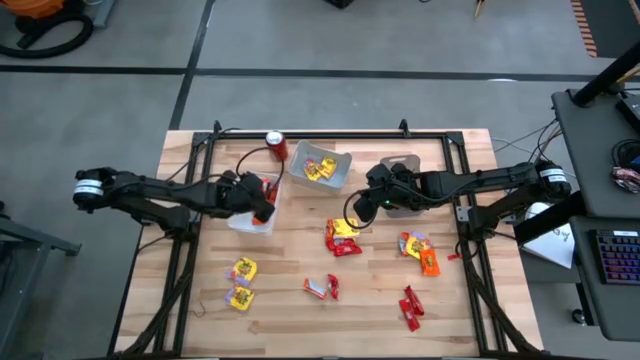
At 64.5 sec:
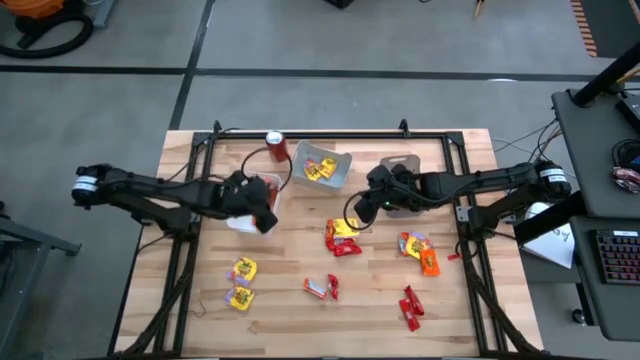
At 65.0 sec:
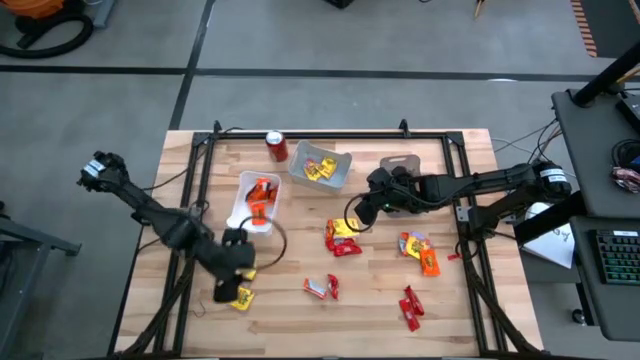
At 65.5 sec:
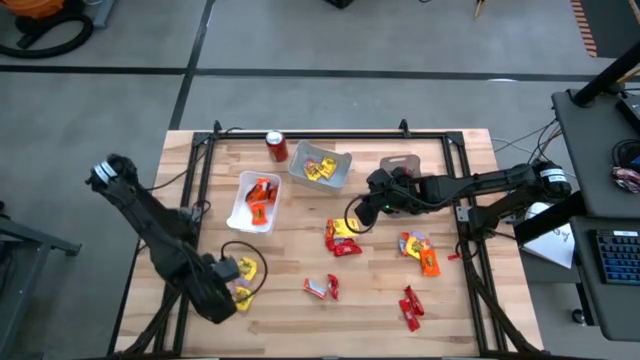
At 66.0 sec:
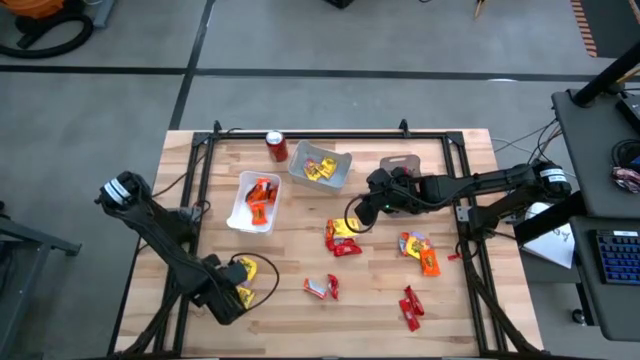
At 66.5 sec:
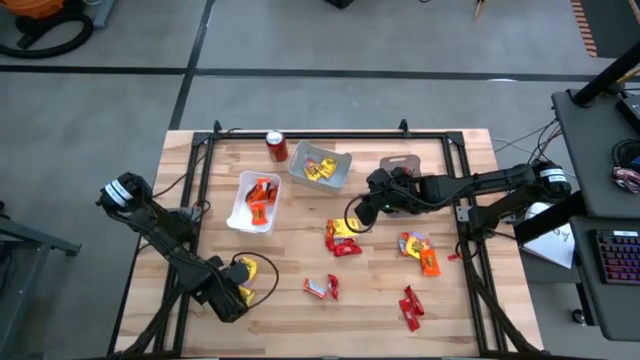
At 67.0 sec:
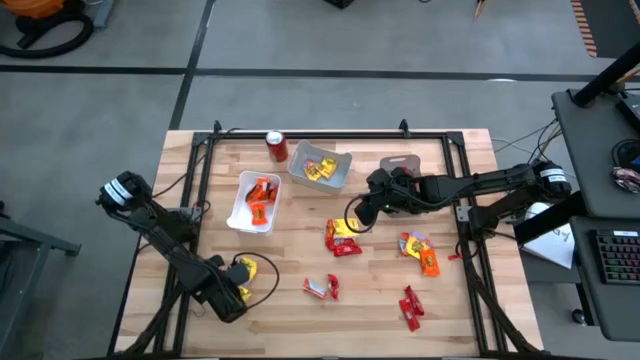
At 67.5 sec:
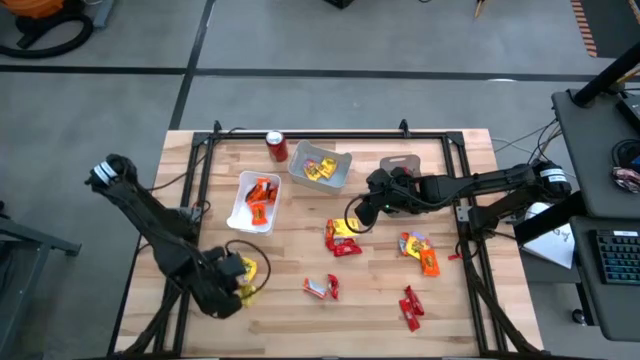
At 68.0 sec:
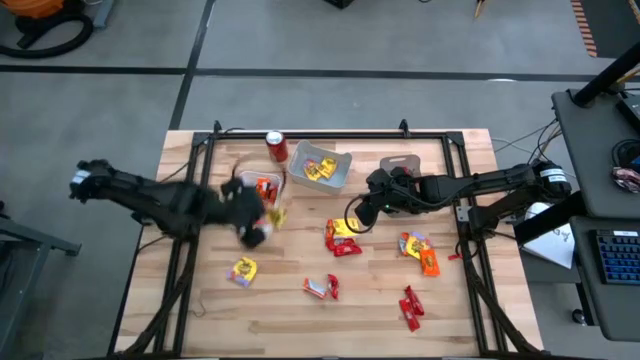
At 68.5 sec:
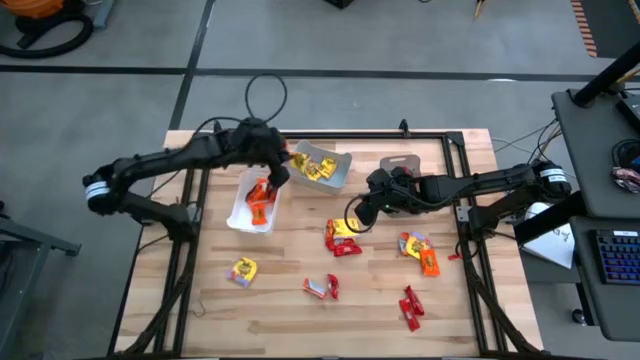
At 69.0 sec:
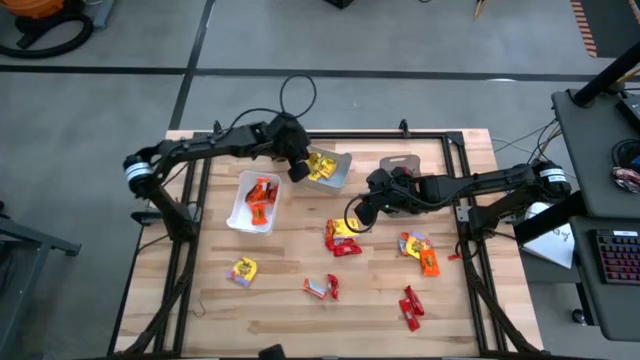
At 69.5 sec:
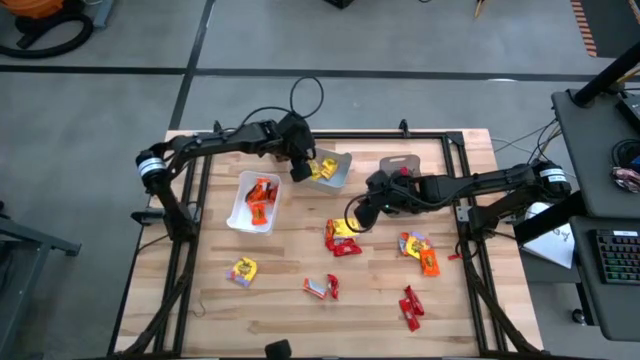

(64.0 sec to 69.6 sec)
Task: Sort candy
Put the yellow candy into the gray bin

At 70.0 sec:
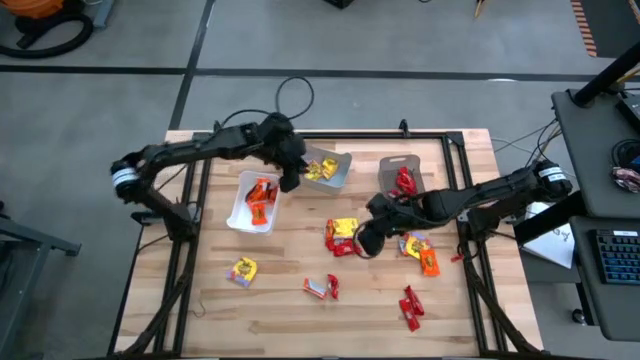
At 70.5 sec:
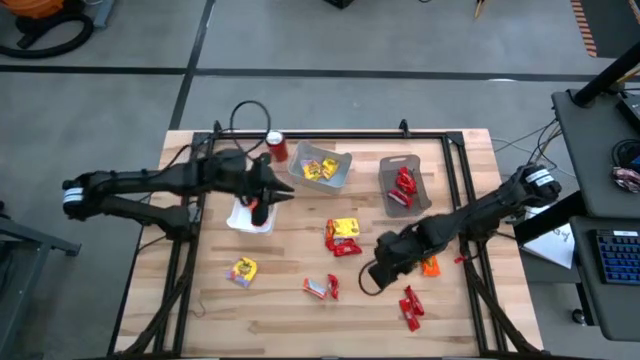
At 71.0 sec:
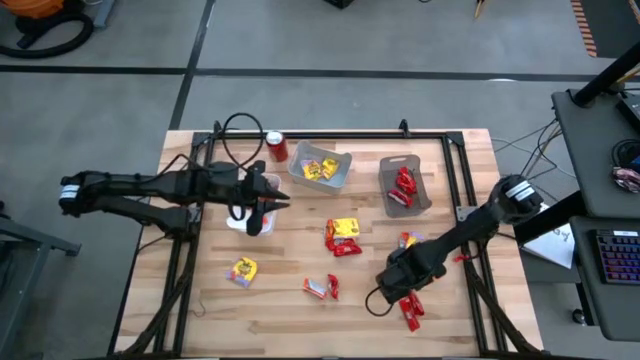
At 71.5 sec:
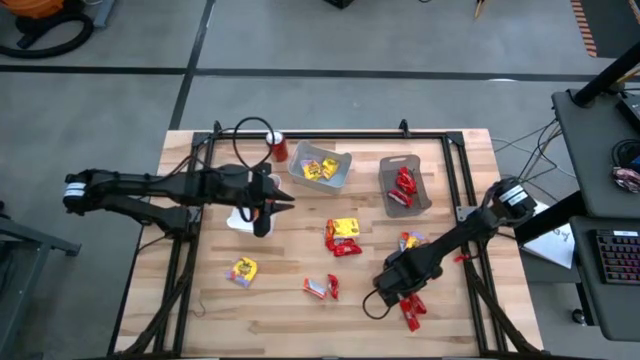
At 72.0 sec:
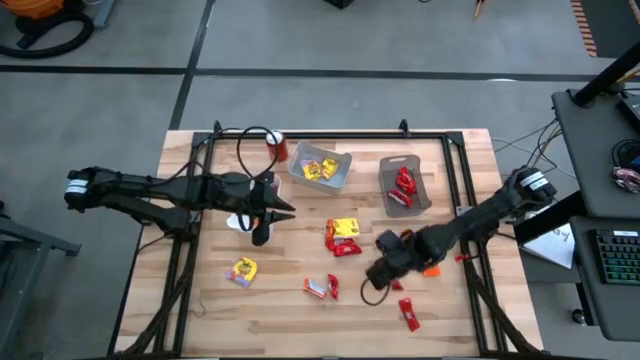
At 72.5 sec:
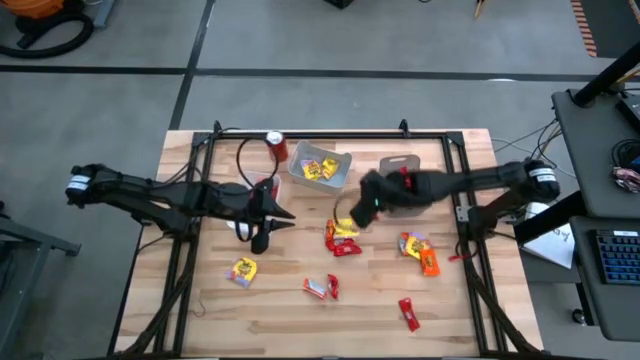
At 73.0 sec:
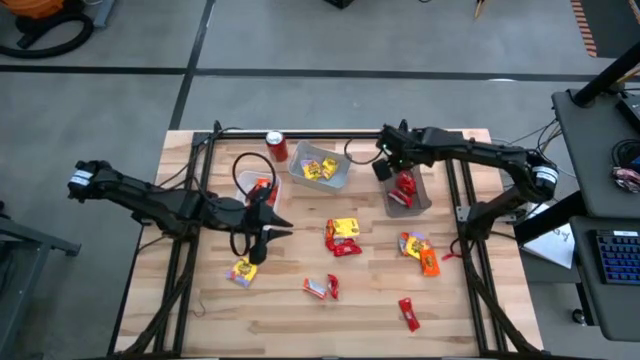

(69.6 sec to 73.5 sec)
Put the red chocolate into the black bin

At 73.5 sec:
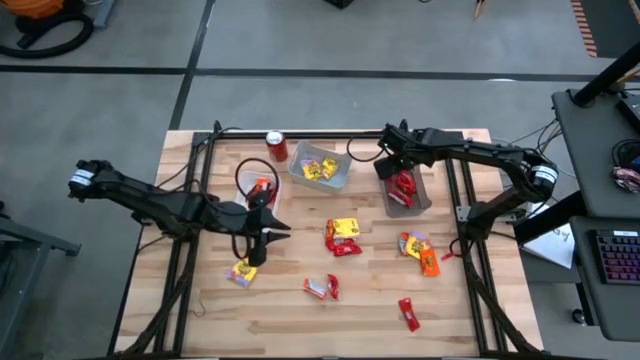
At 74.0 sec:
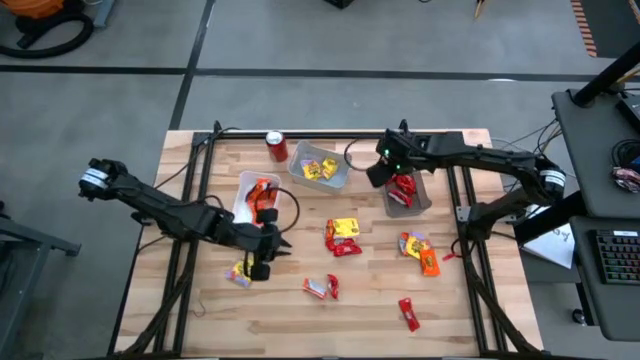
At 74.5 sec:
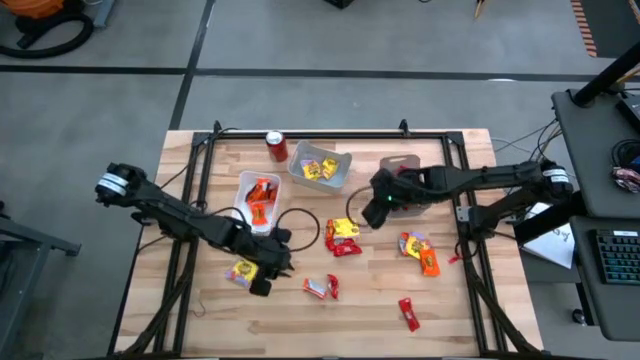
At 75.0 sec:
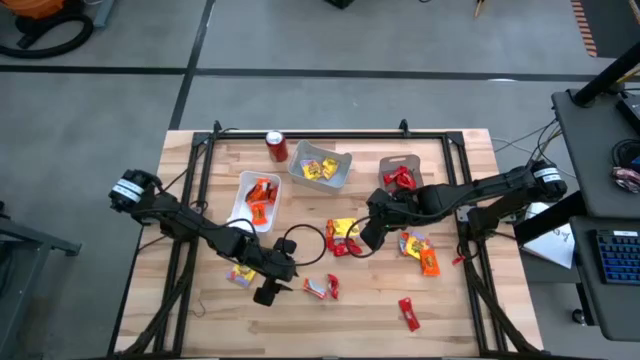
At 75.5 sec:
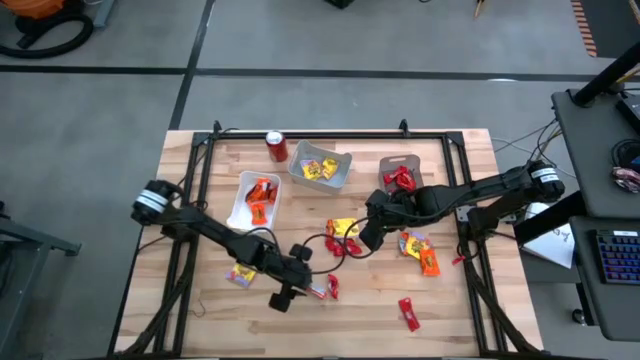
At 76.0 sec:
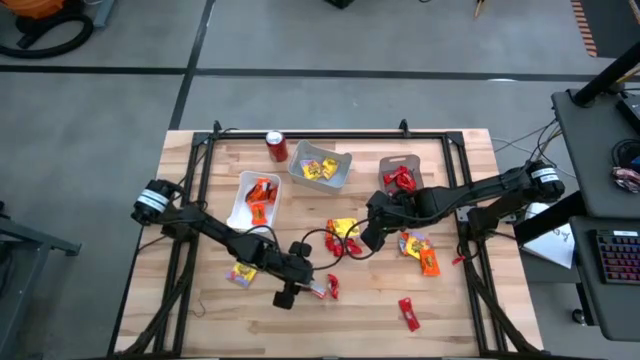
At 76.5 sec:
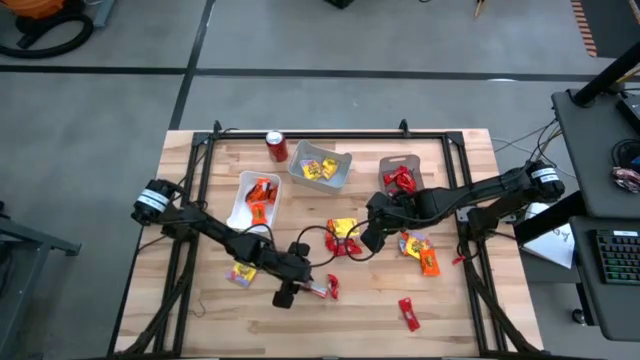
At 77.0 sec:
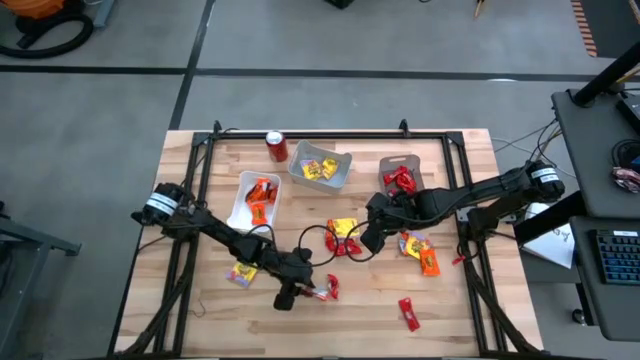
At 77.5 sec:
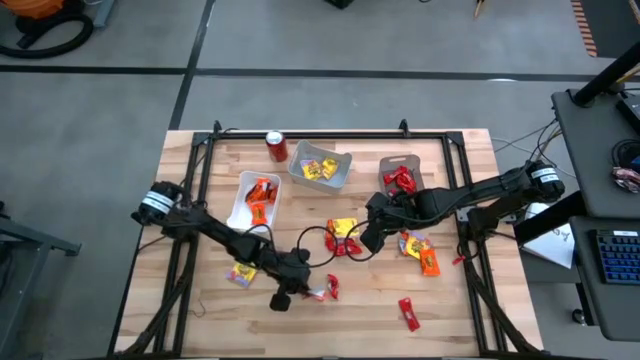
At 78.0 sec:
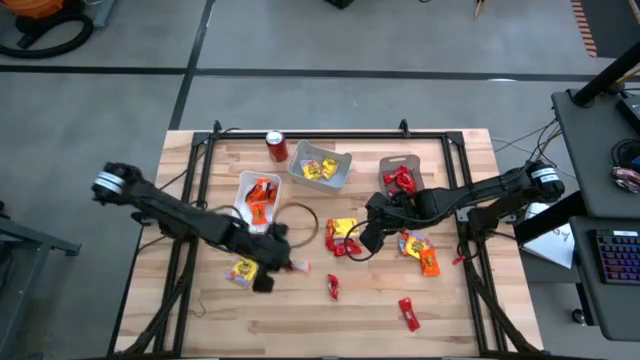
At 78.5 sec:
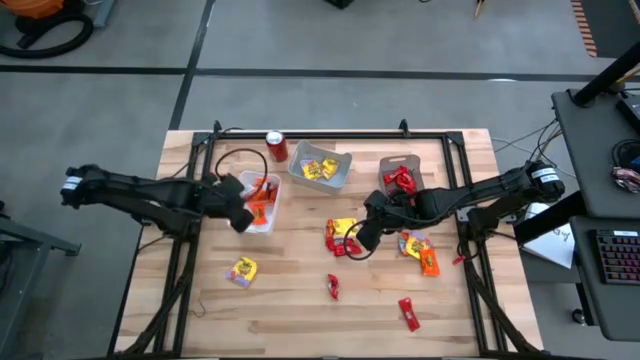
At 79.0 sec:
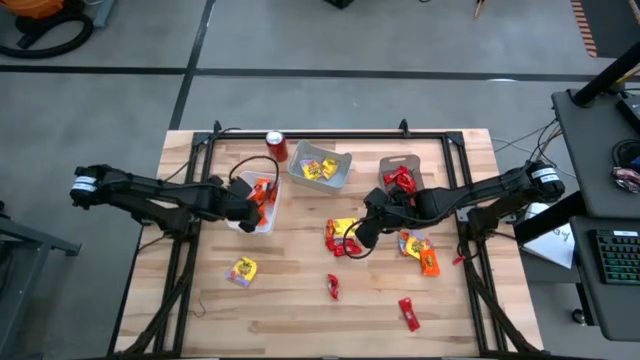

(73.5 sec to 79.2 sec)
Put the orange chocolate into the white bin

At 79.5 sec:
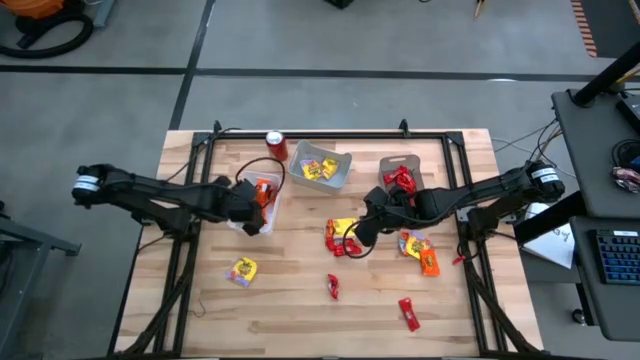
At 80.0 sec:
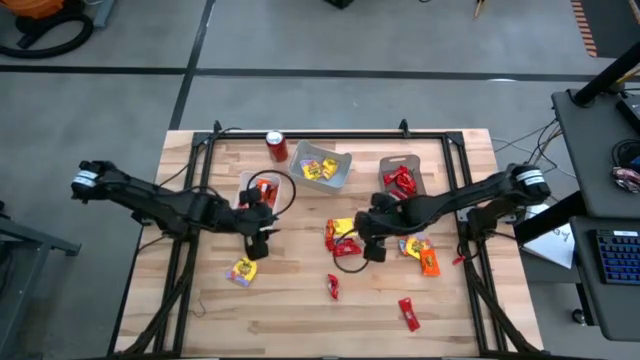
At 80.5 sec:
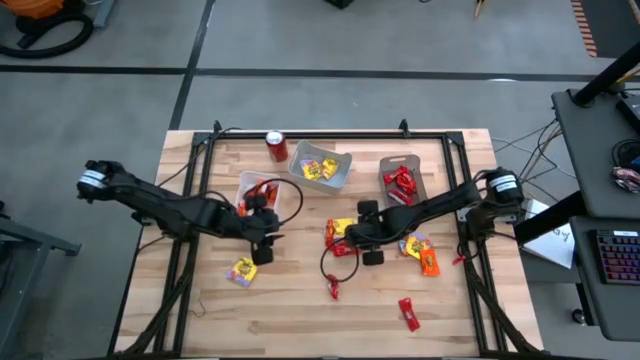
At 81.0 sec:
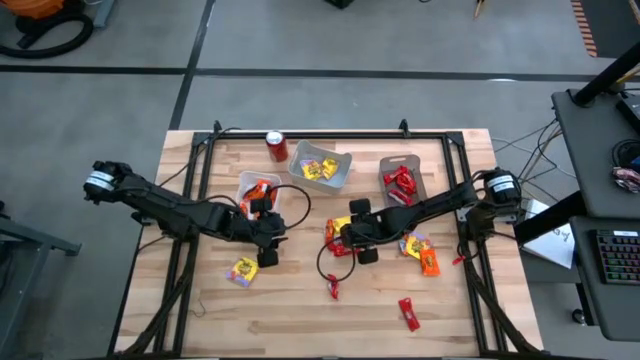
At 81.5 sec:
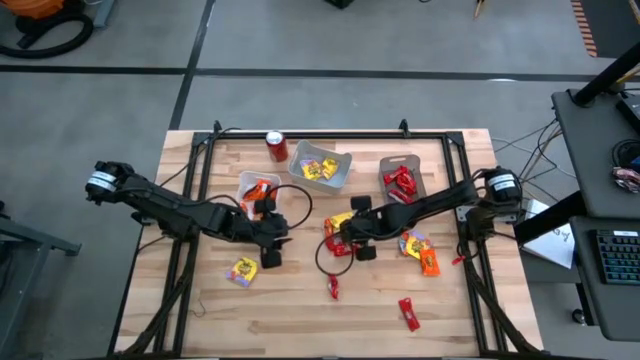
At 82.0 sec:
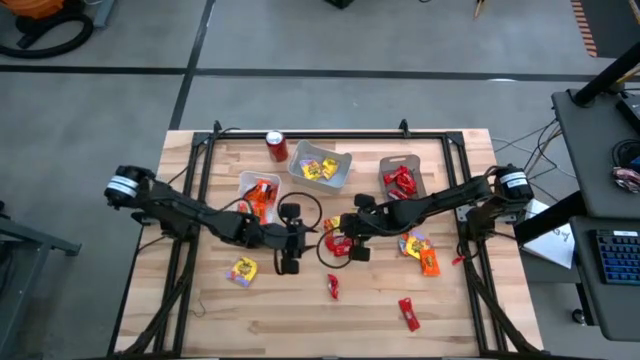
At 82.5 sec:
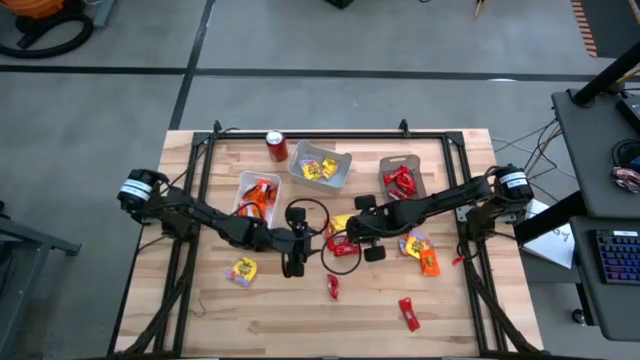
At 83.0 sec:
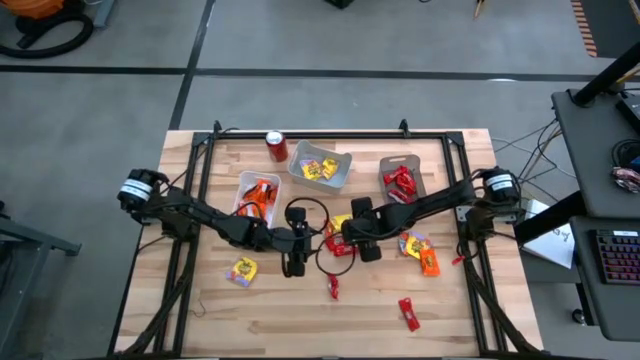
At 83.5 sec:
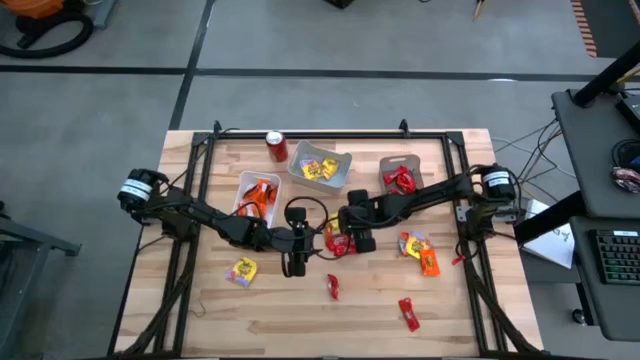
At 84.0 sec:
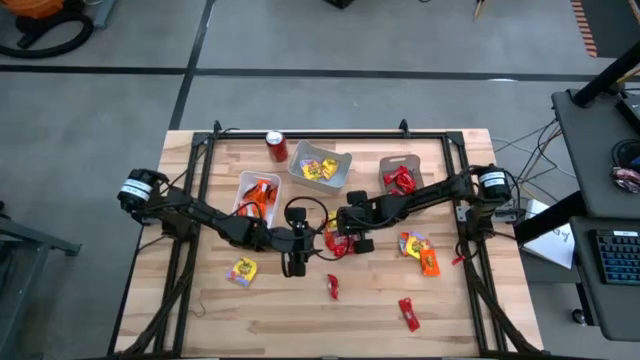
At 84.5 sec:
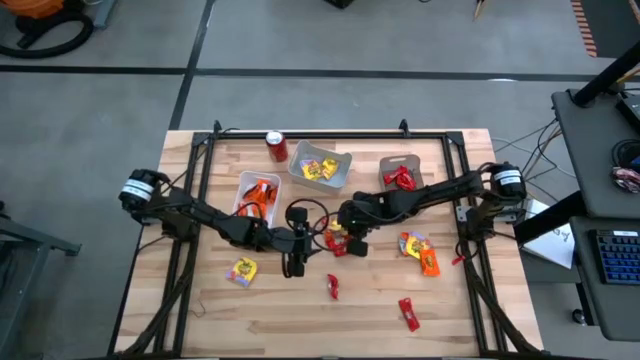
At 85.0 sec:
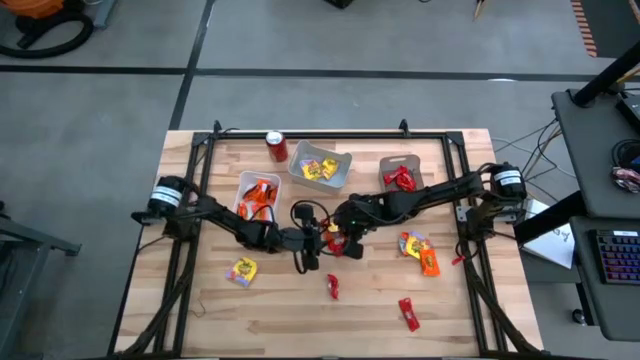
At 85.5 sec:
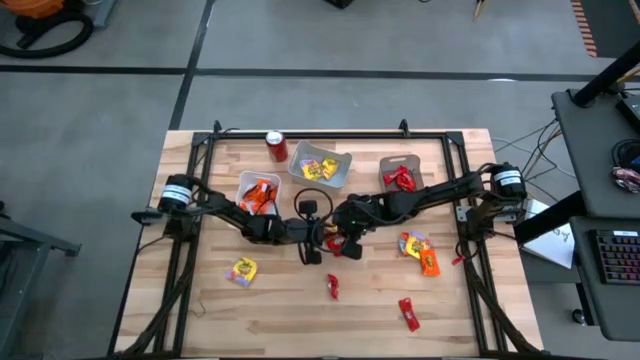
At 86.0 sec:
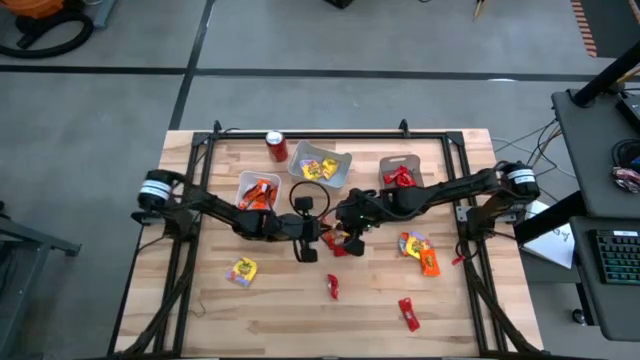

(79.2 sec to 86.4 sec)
Put the yellow candy into the gray bin
